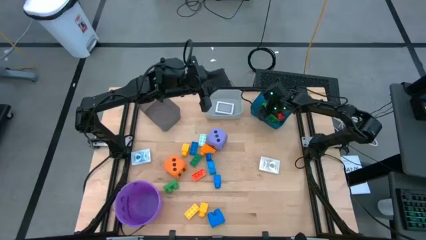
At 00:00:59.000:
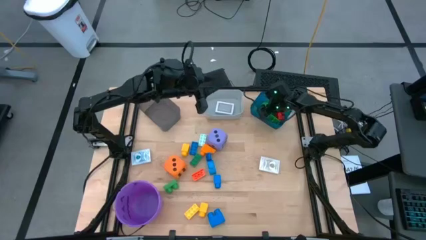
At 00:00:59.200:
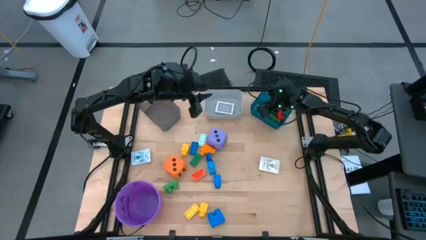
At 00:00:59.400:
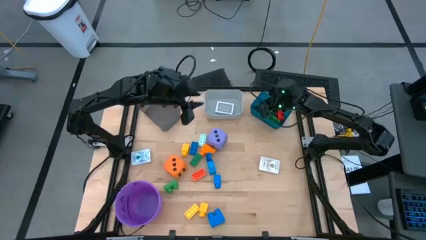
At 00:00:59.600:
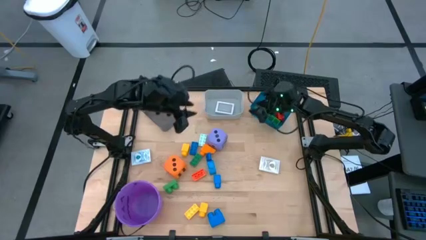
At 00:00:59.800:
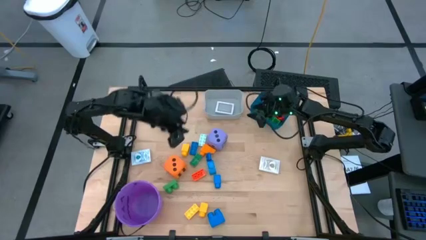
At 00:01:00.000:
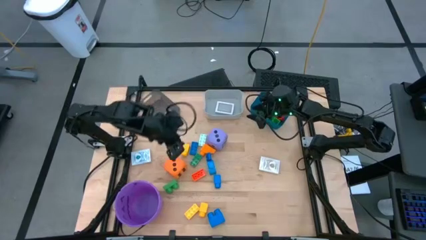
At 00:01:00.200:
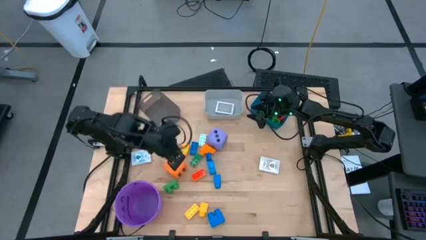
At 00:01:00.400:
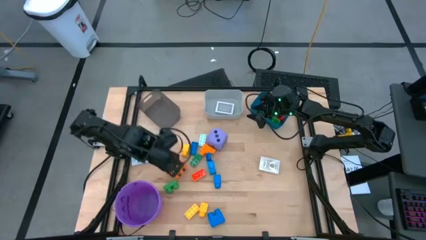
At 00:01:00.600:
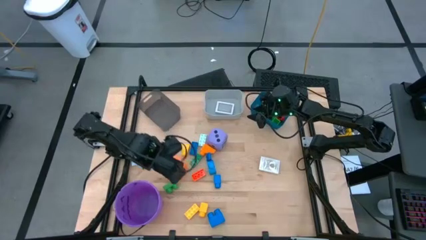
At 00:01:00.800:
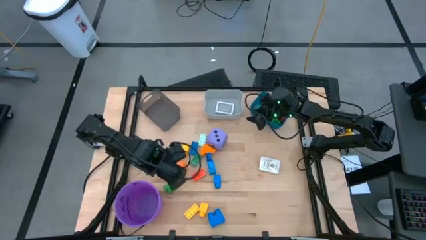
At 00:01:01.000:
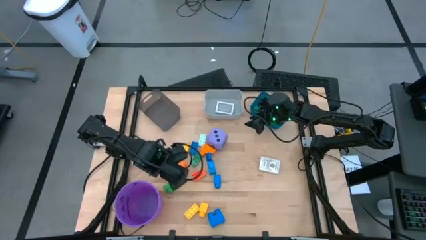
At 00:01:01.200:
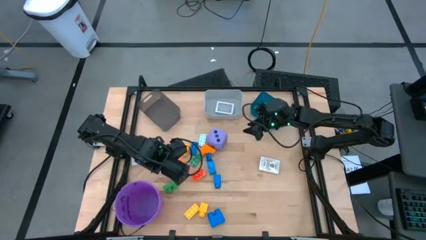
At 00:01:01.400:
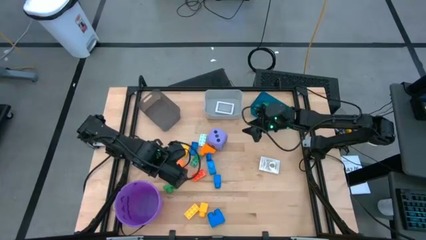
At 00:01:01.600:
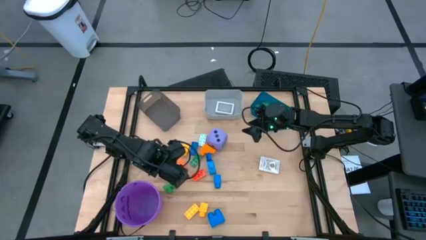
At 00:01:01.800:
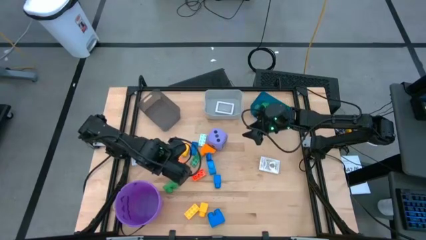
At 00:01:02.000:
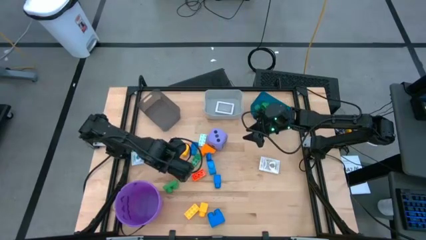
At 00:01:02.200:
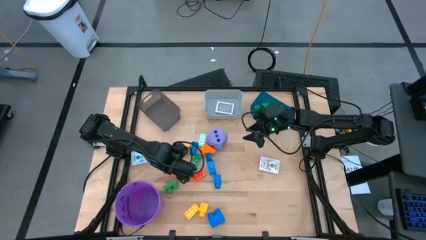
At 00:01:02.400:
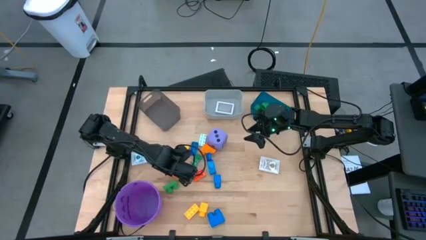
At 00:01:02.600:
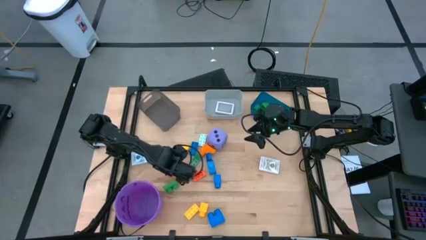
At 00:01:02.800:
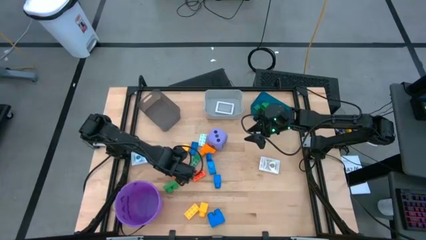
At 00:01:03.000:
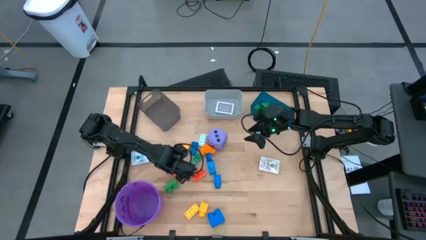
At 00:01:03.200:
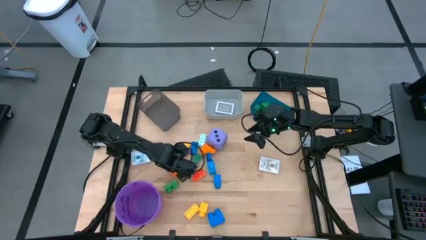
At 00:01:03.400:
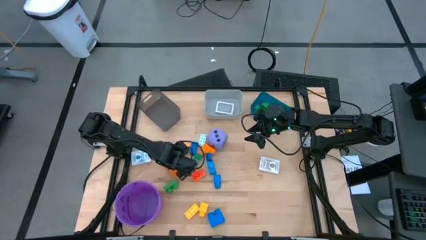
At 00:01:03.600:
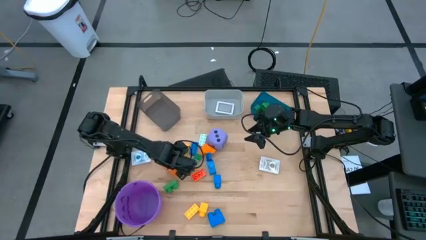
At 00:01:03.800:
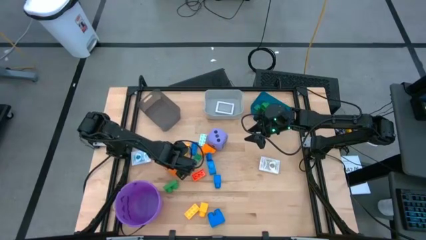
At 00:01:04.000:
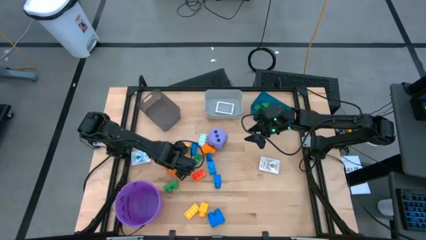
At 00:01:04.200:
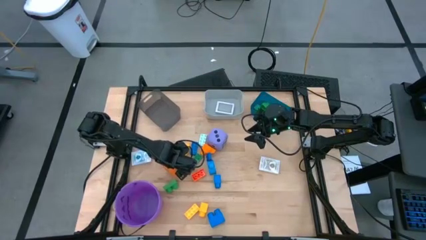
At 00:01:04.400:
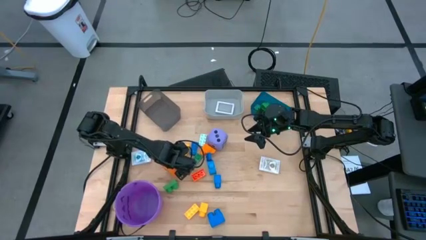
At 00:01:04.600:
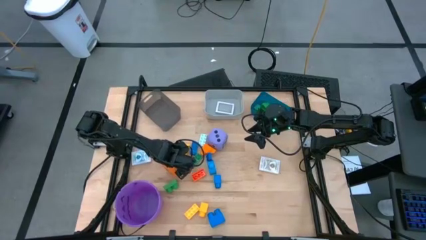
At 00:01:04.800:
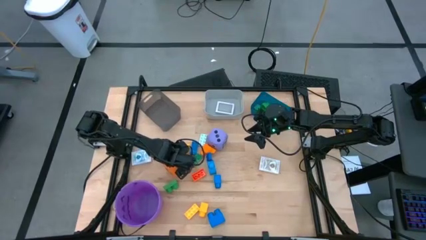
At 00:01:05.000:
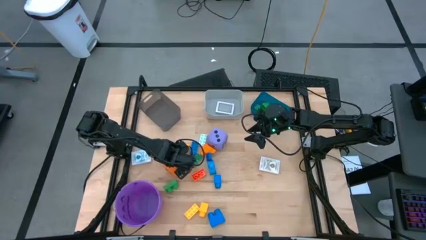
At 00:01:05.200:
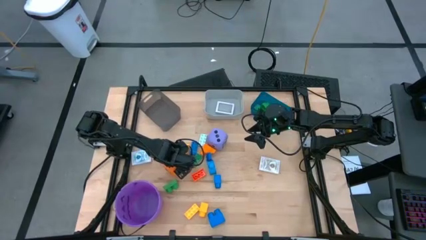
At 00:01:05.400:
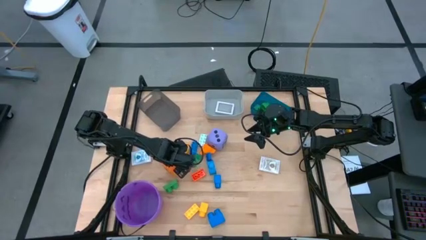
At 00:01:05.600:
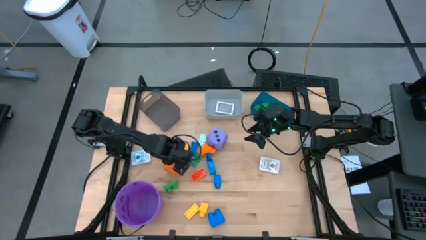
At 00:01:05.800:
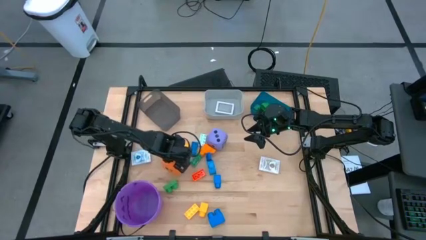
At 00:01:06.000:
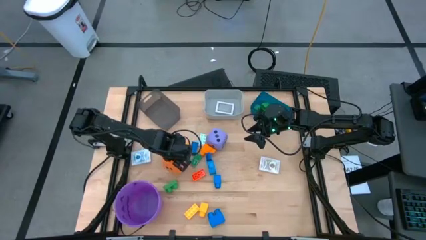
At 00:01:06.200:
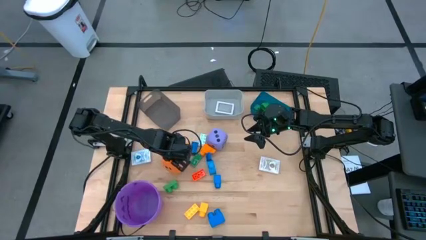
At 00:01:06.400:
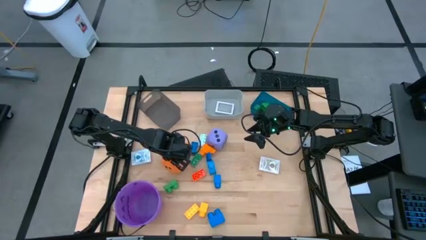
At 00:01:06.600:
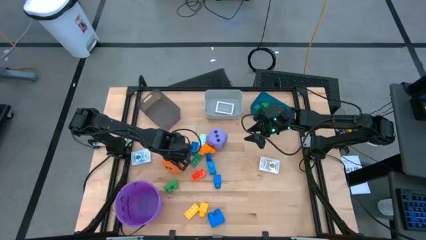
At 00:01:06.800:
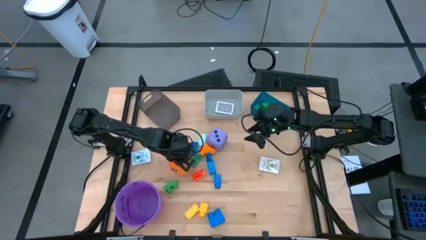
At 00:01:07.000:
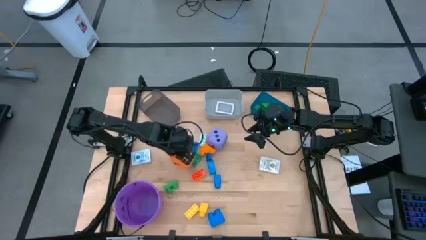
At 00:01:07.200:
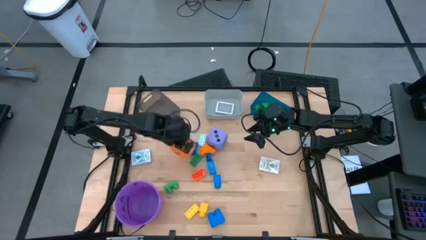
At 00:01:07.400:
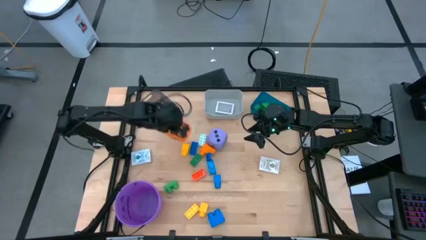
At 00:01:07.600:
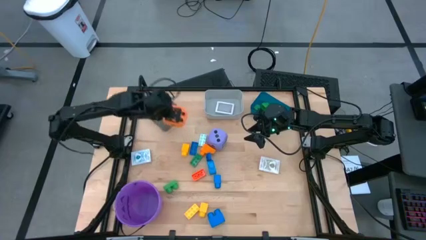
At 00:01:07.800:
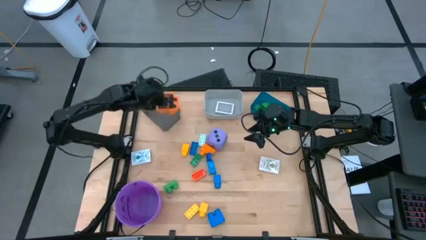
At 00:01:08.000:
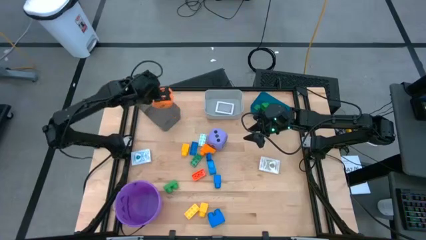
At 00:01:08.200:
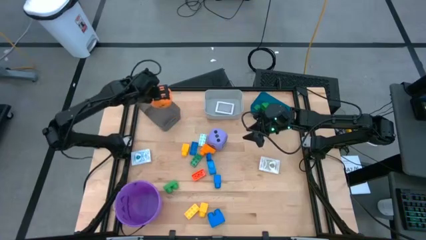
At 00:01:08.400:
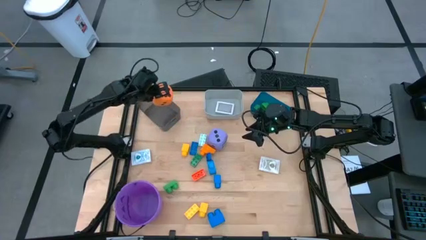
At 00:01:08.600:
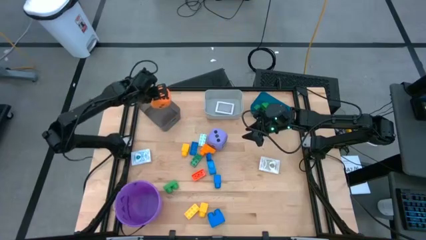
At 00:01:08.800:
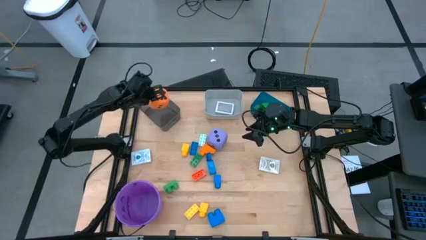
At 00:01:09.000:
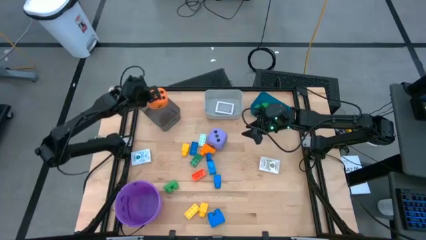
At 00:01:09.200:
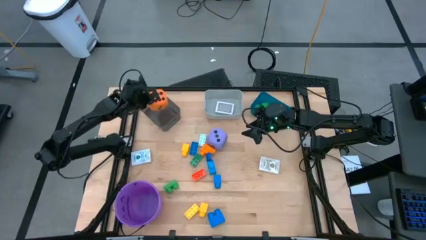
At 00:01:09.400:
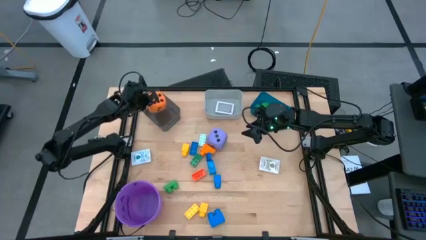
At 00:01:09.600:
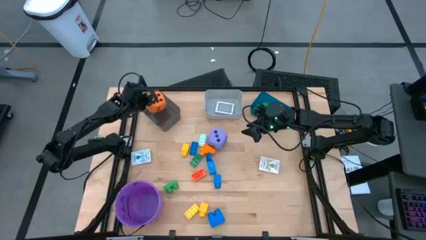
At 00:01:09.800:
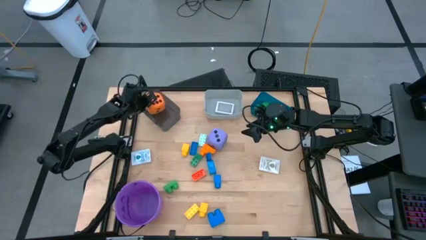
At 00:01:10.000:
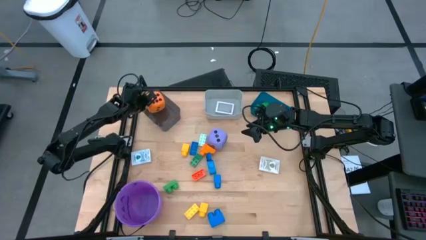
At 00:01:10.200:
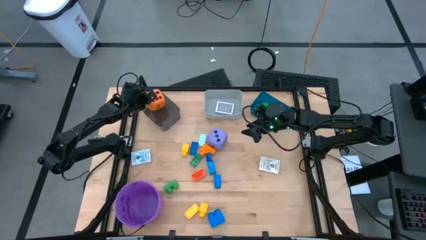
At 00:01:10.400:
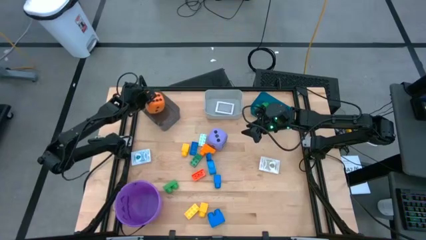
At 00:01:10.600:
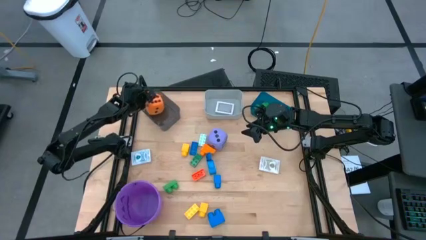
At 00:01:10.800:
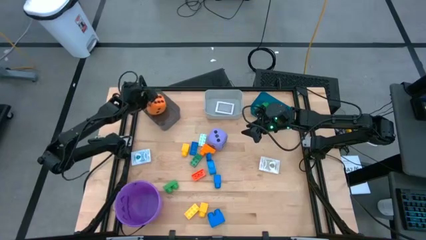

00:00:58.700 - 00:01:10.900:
Task: Pick & Place Toys
Put the orange dice into the black bin
